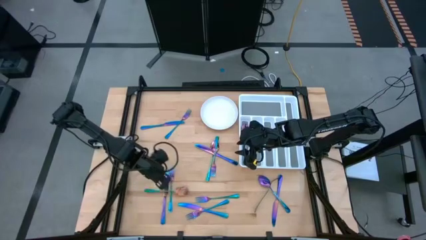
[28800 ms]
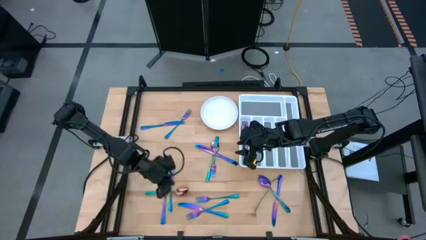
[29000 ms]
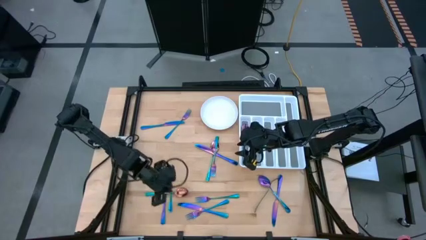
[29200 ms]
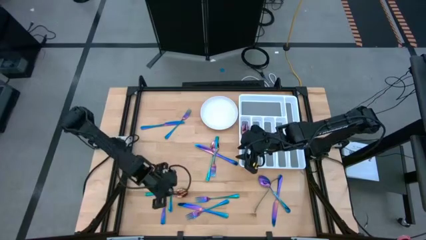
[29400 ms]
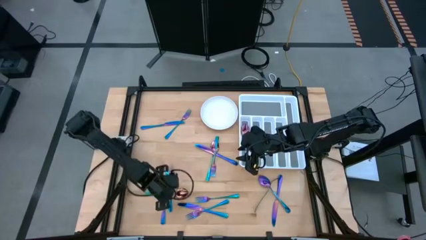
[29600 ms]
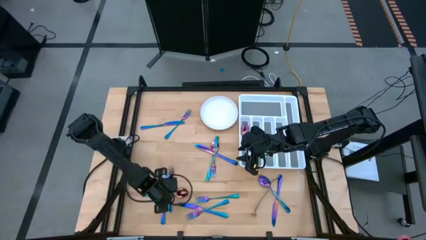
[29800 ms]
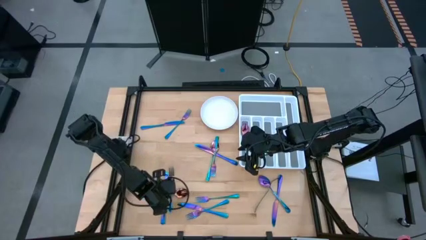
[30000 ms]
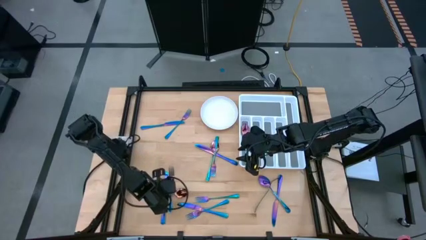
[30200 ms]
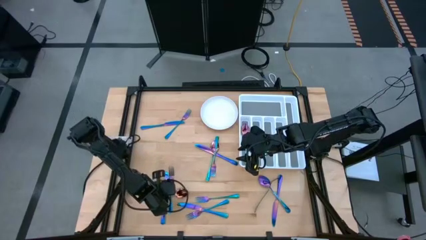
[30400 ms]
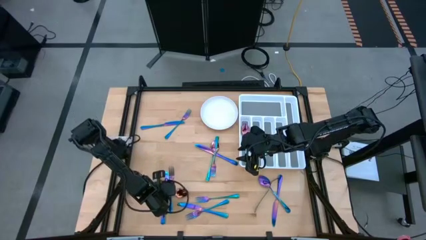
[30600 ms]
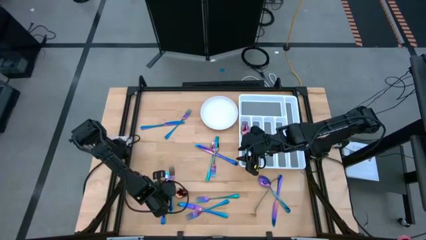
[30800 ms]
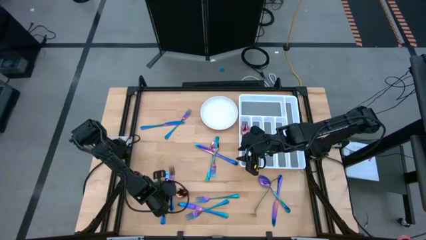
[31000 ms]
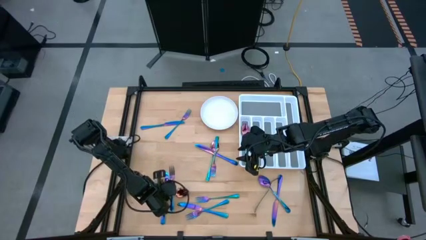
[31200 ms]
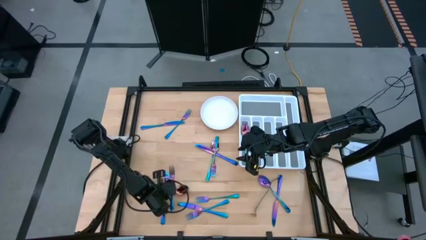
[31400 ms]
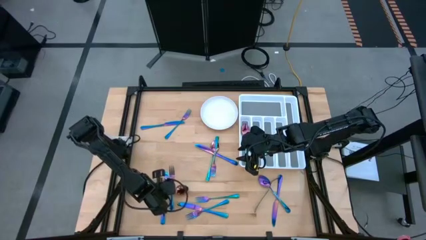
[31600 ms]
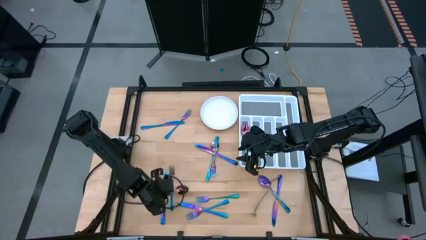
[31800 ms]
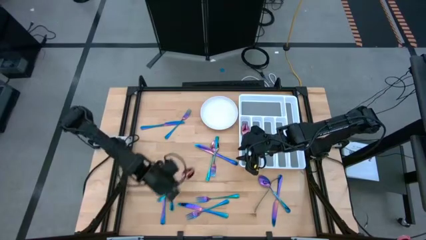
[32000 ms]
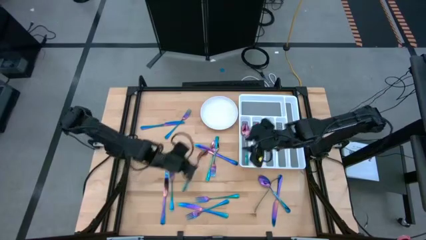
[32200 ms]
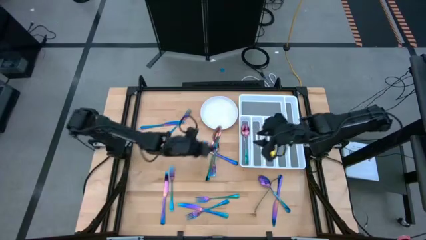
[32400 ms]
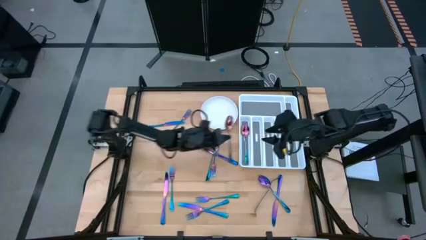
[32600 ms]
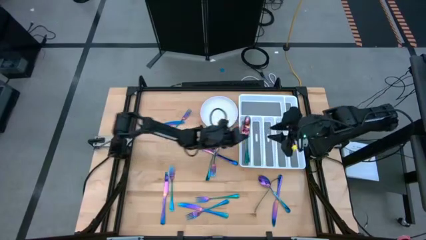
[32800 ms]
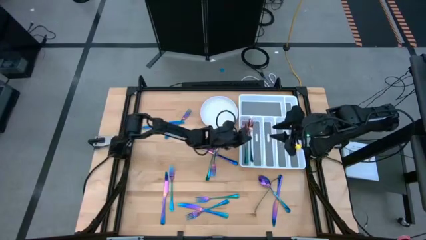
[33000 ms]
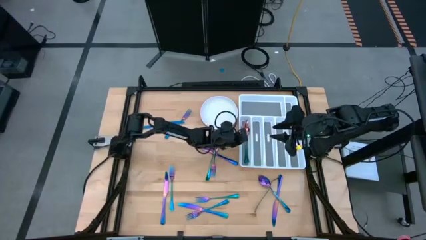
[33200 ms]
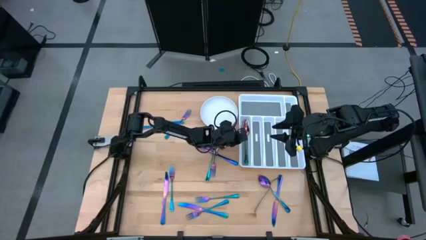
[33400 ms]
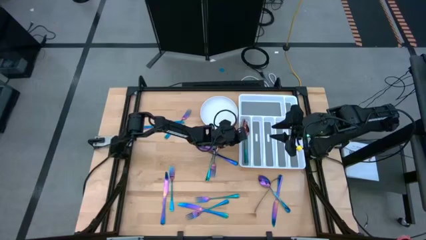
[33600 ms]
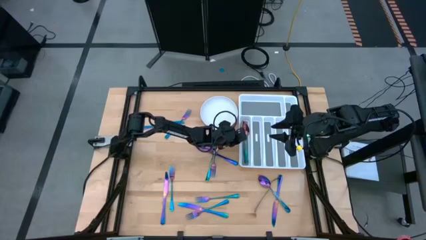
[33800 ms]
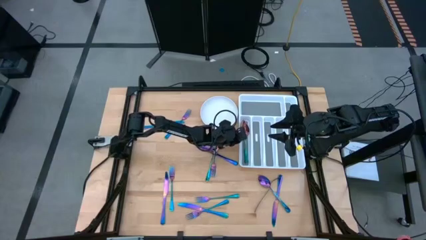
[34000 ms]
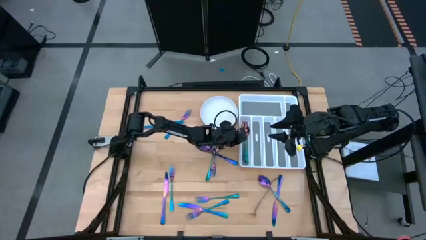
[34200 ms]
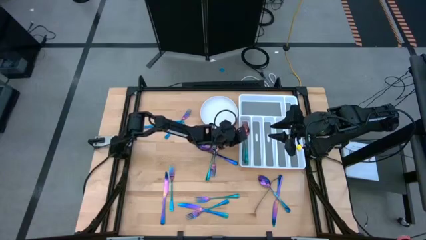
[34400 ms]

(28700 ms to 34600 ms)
Task: Sort silverware
Put the purple spoon into the white silverware tray

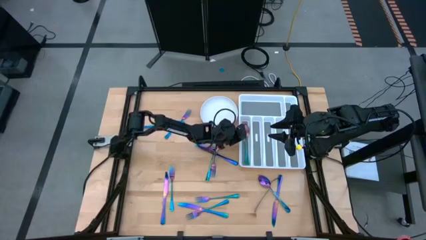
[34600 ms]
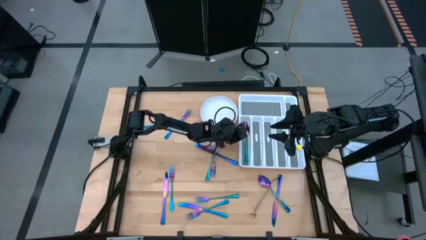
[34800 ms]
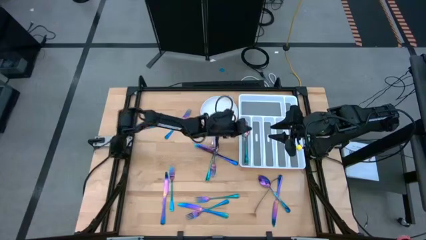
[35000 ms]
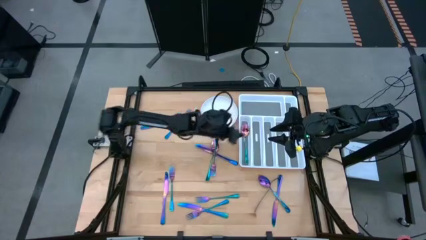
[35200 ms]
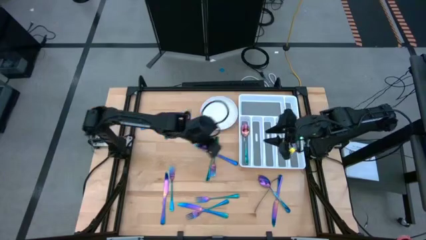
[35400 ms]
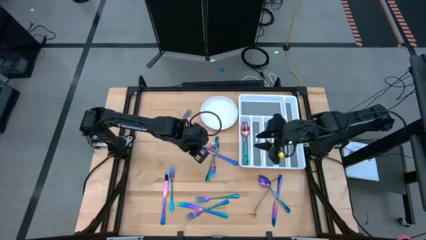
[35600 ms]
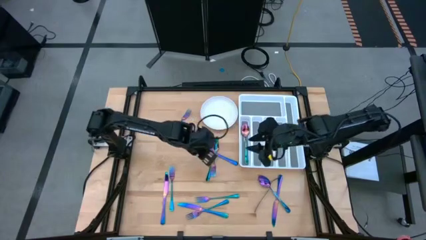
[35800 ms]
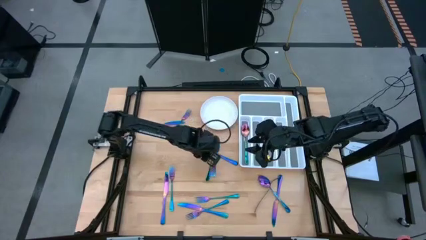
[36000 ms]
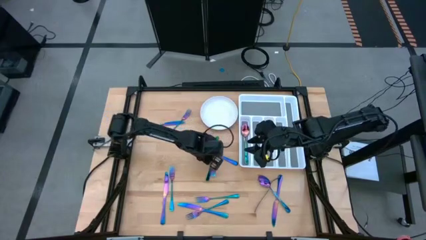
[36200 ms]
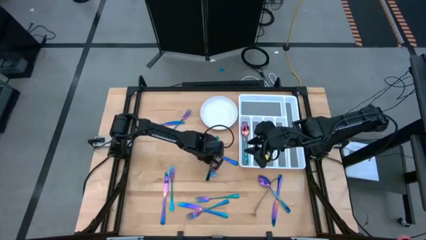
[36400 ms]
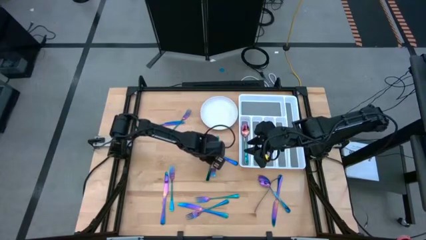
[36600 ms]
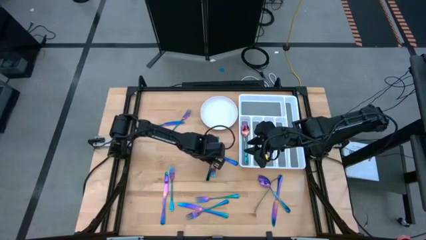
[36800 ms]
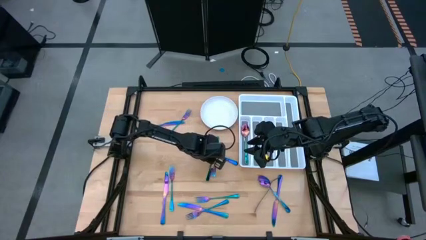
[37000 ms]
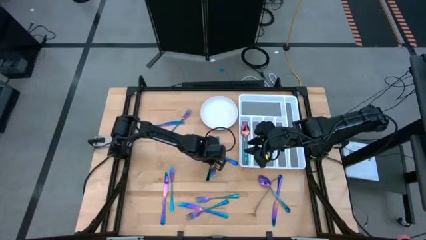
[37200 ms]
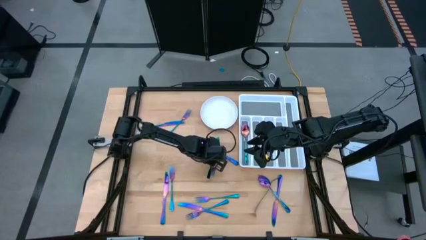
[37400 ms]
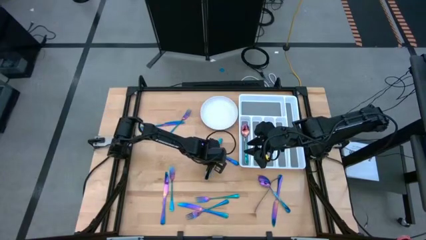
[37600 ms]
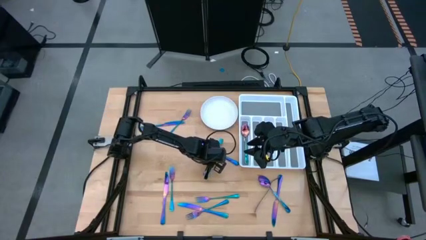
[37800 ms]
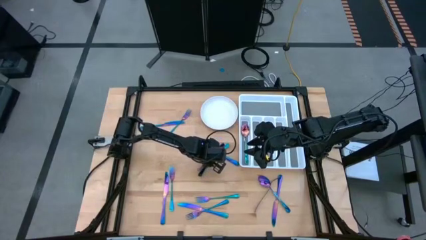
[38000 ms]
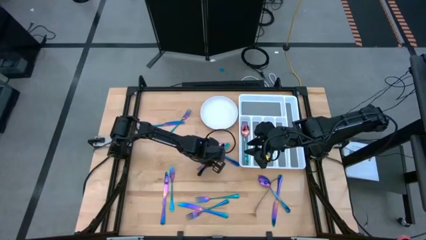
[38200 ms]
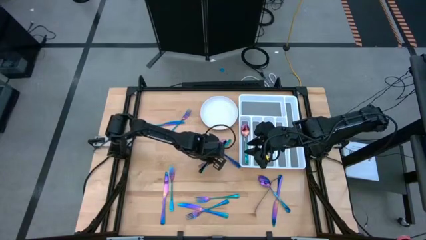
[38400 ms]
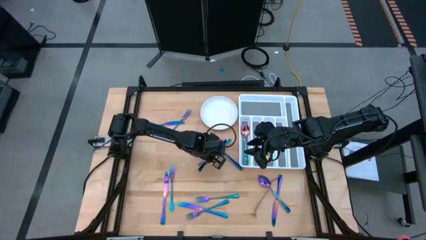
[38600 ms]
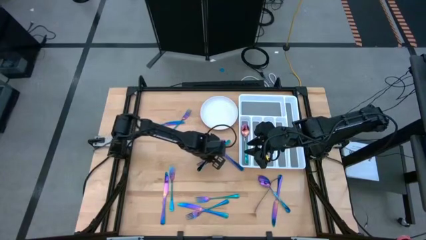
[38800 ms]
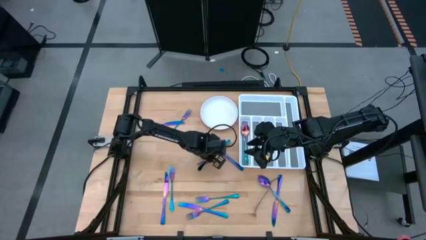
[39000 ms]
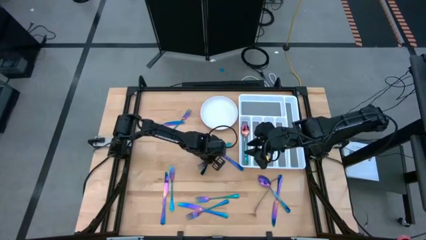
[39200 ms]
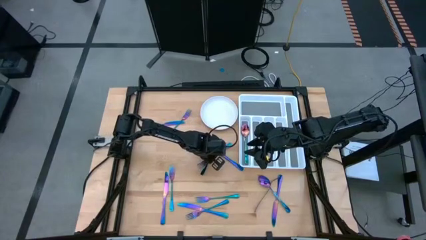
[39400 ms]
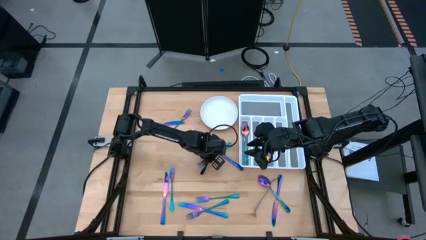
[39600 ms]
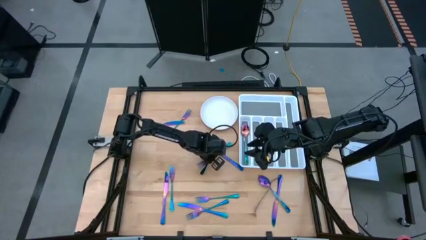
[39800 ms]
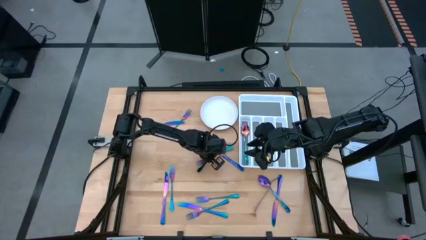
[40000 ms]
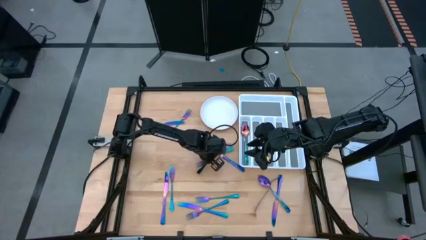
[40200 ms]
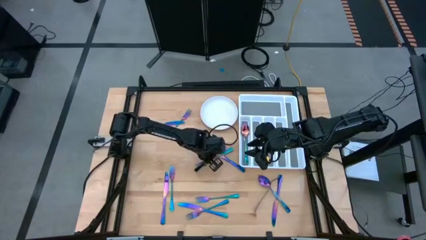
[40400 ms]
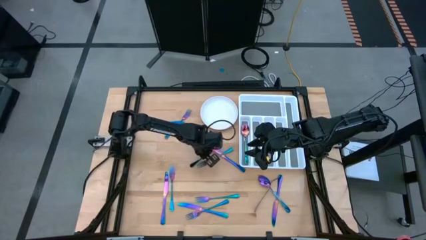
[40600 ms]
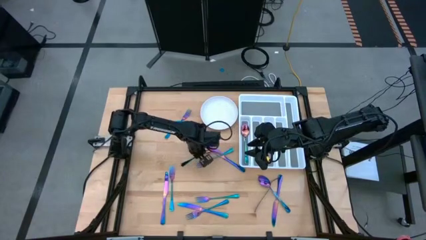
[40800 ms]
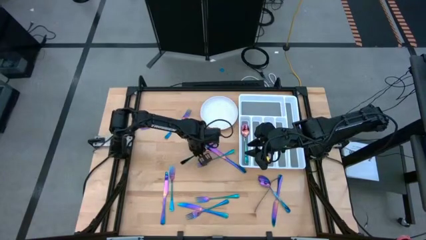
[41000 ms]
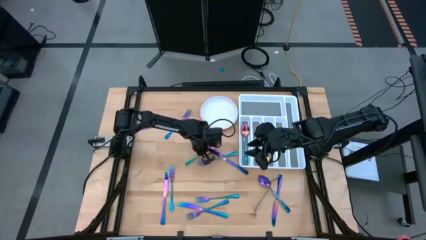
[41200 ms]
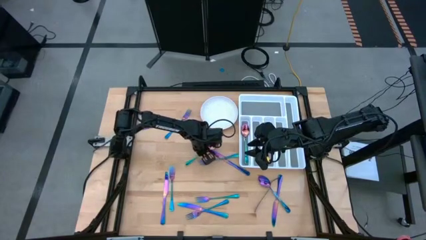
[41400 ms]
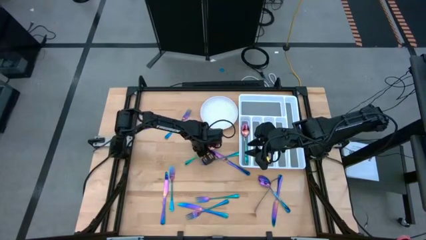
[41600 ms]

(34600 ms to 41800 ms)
Put the purple spoon into the white silverware tray

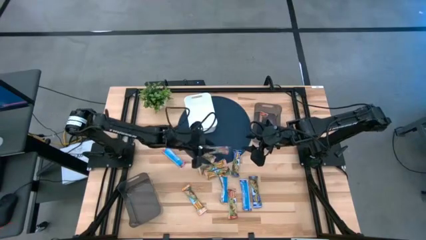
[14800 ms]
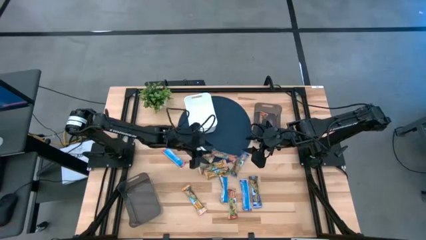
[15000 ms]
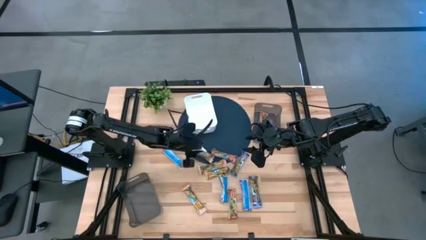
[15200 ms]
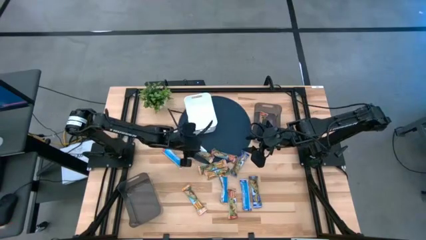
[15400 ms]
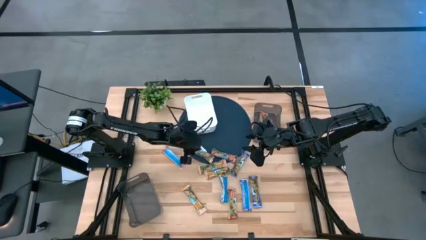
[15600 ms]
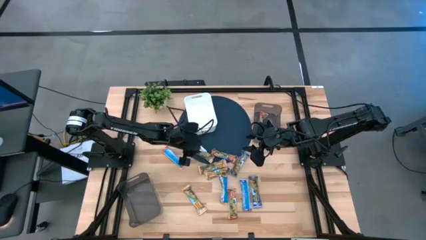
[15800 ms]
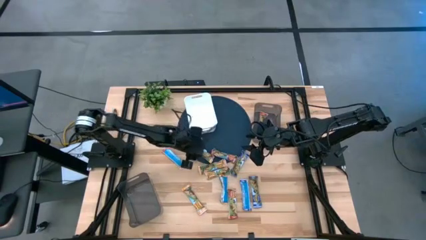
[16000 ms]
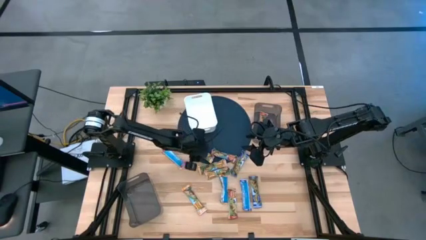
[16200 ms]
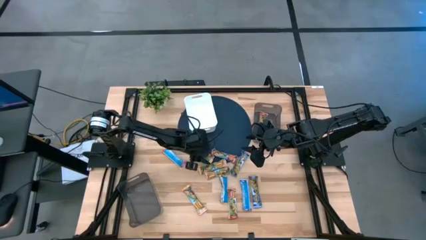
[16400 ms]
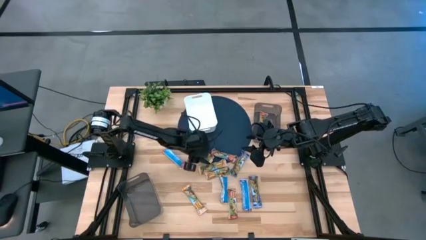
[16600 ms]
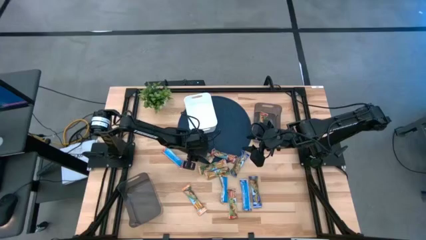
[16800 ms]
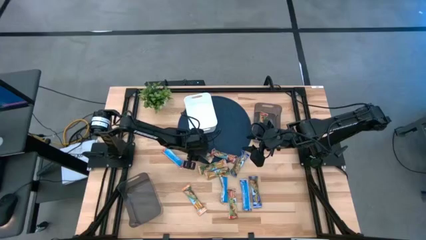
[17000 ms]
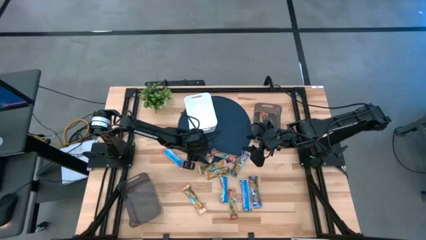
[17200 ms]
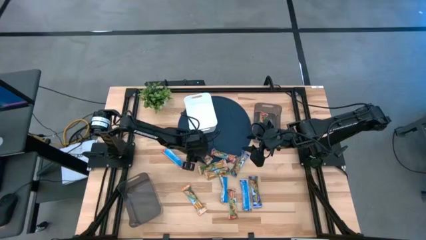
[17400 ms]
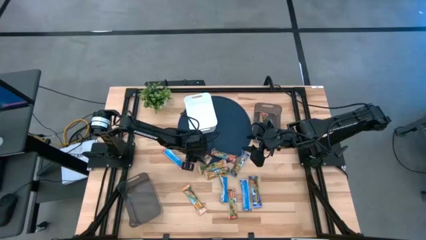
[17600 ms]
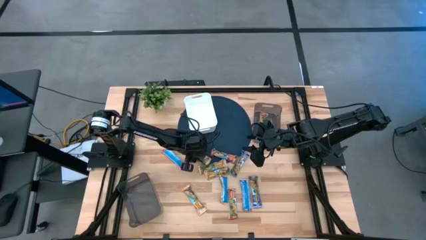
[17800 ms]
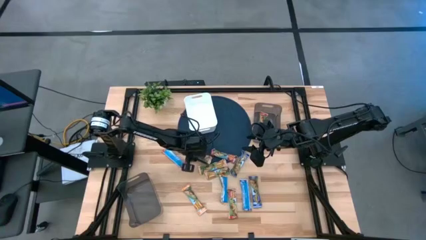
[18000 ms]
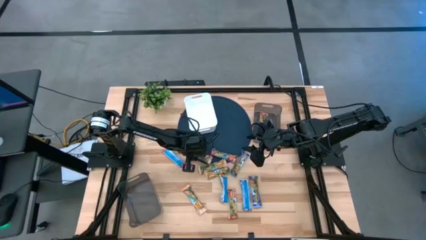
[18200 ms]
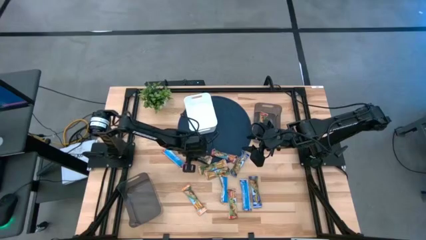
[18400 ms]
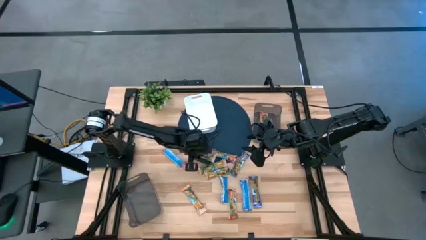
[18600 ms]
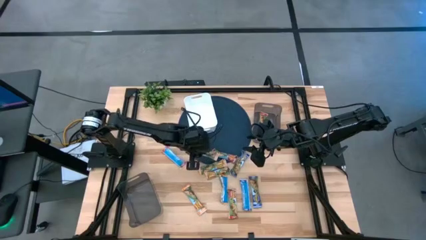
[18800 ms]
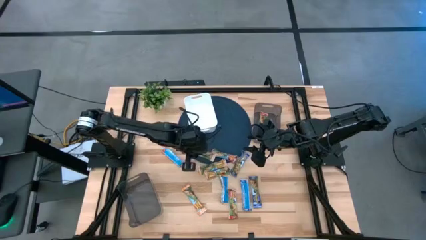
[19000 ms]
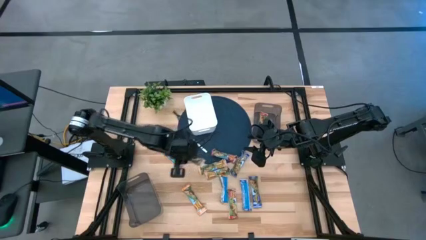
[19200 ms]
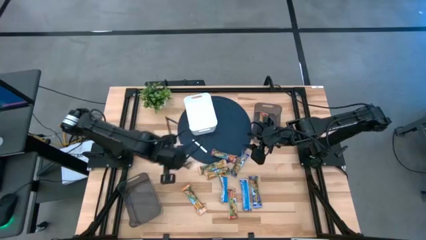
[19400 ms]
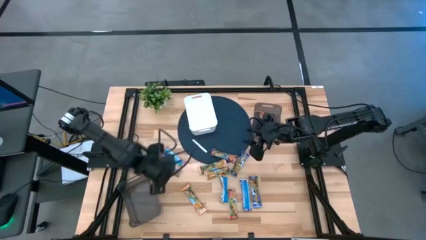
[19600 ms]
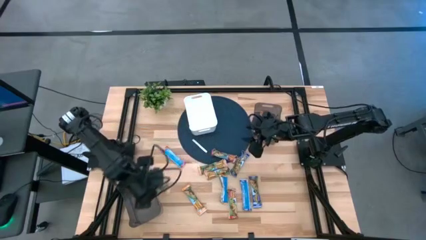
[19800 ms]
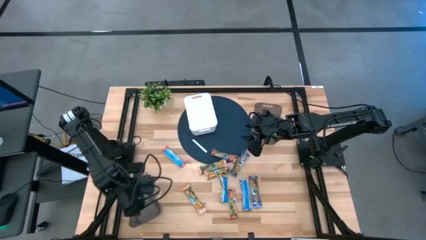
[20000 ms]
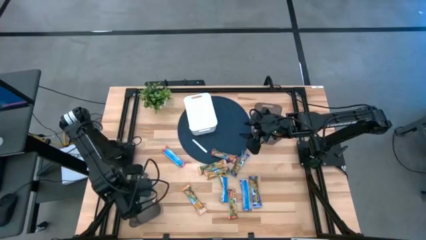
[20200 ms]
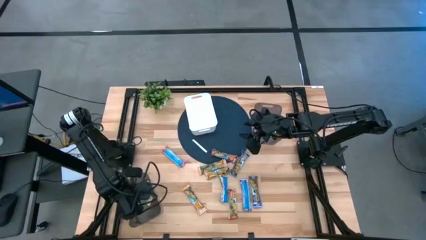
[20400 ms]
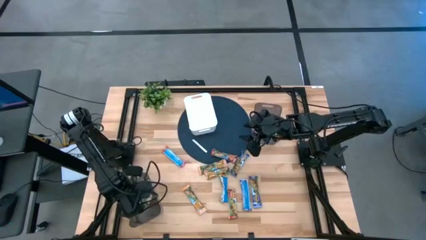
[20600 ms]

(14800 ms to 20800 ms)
Task: Pick and place Granola Bars by type
Put the yellow granola bar into the bottom black bin
